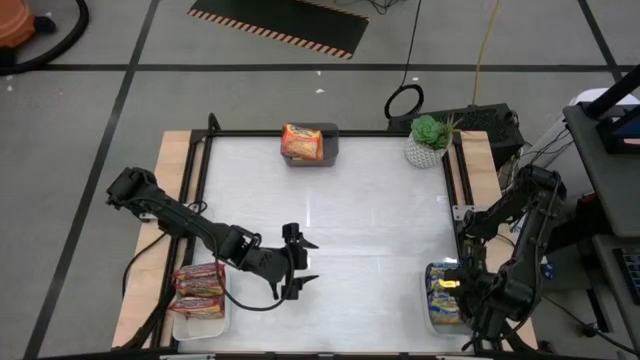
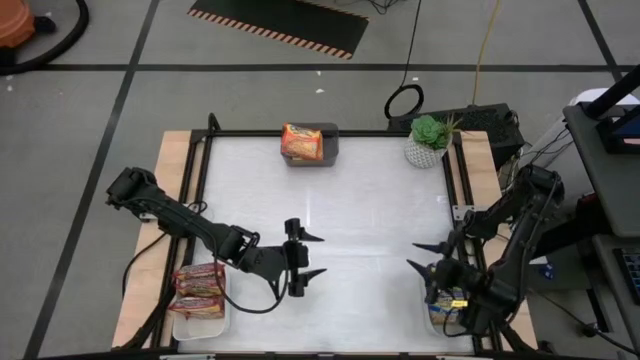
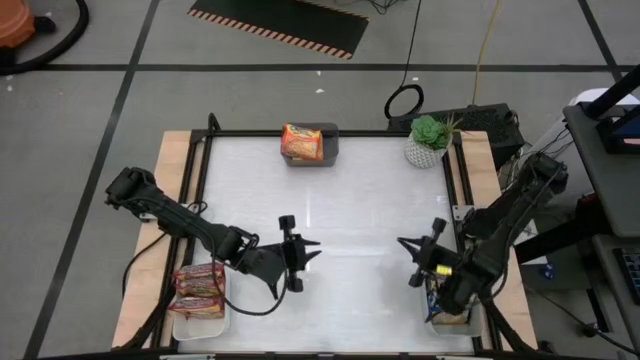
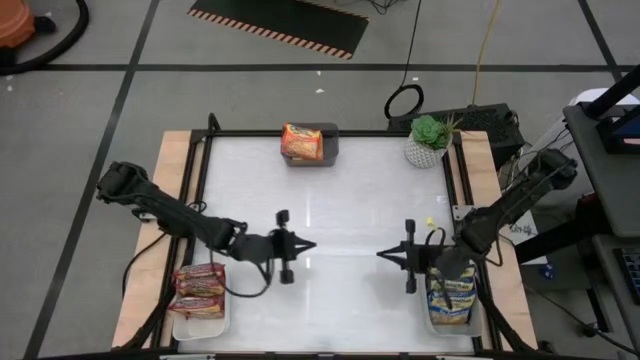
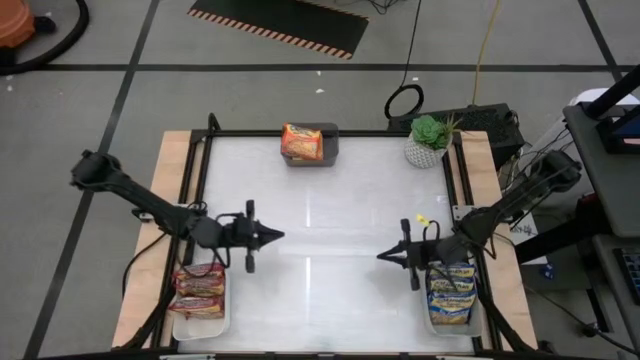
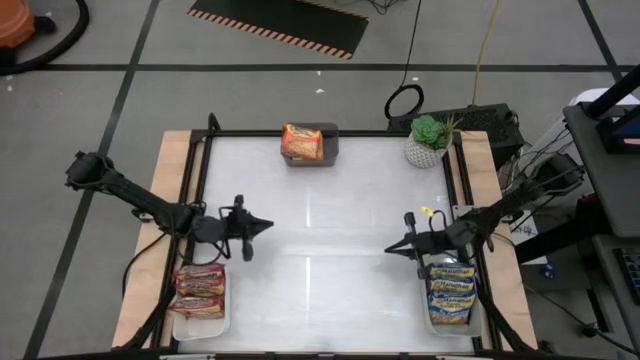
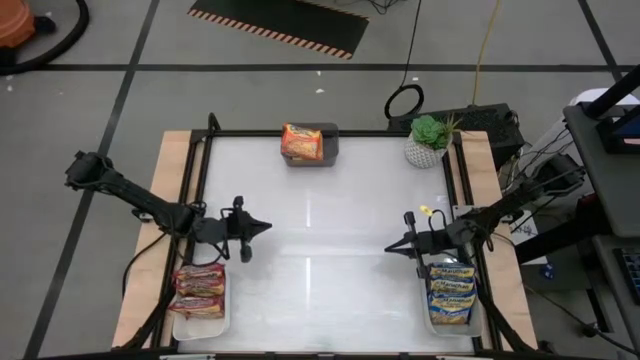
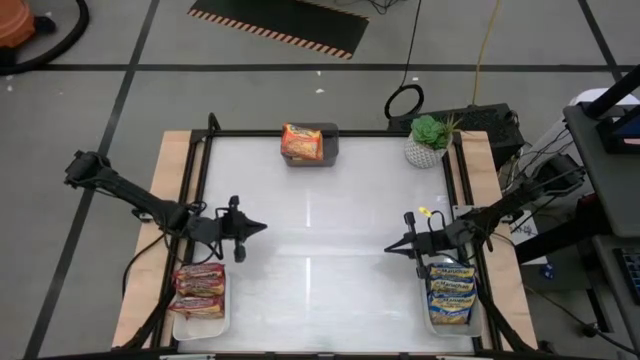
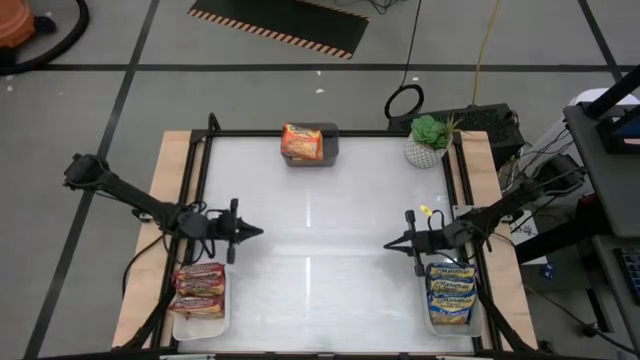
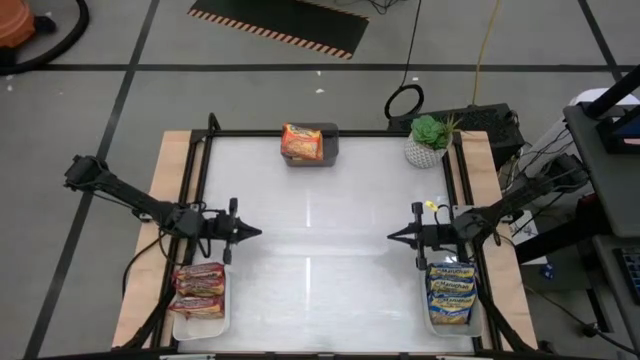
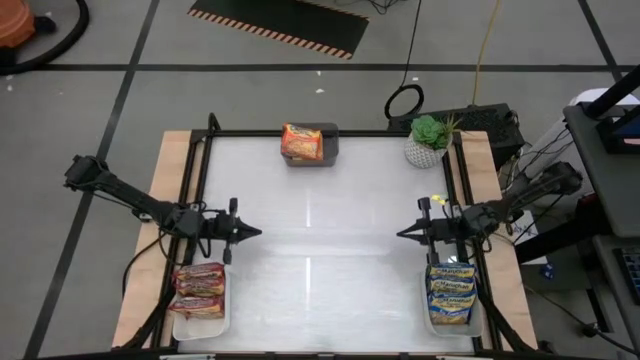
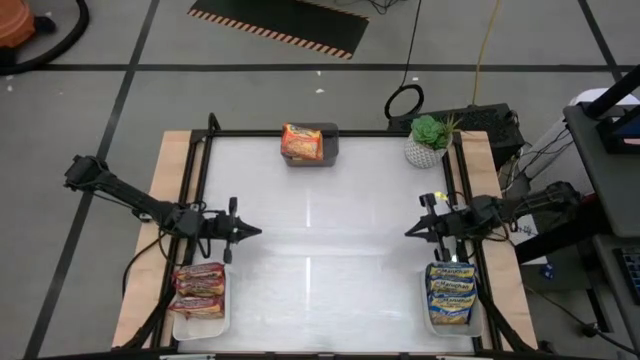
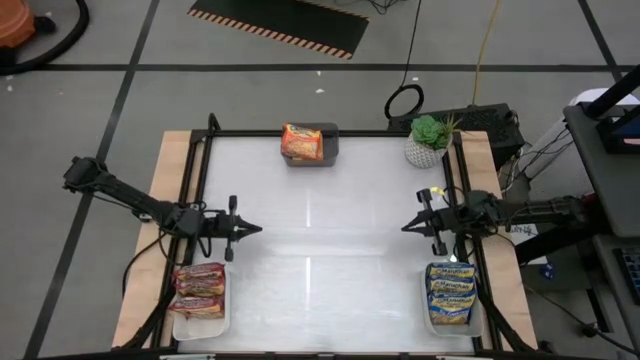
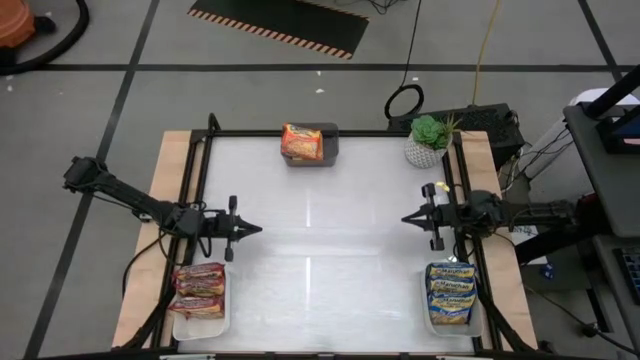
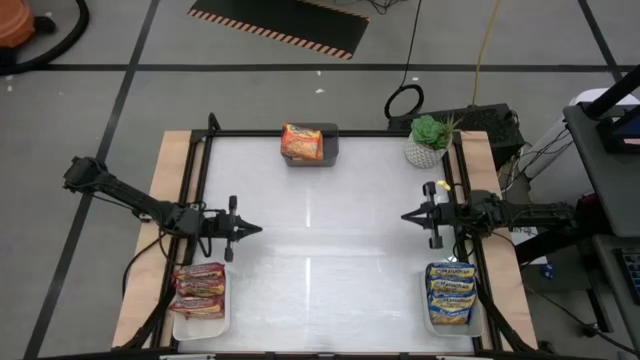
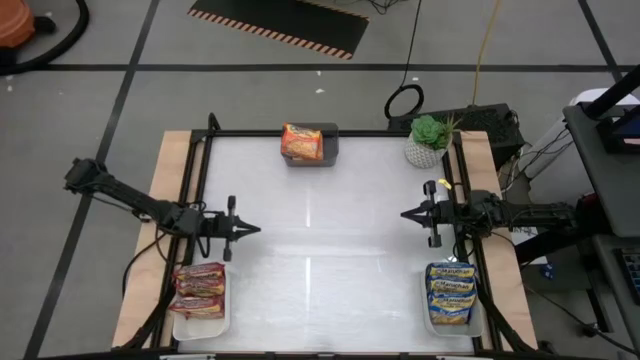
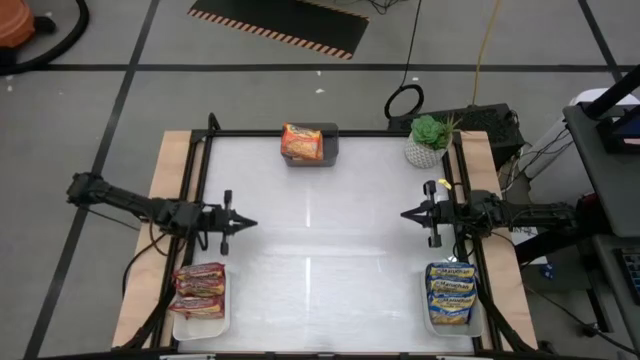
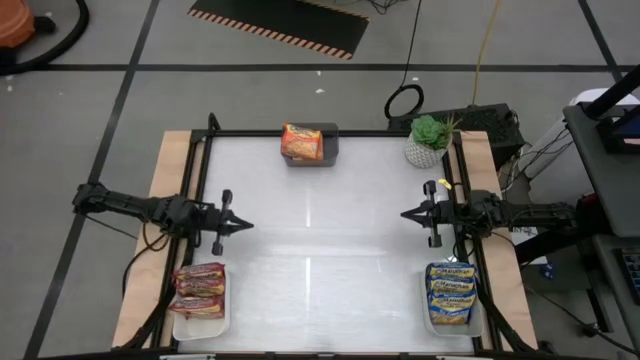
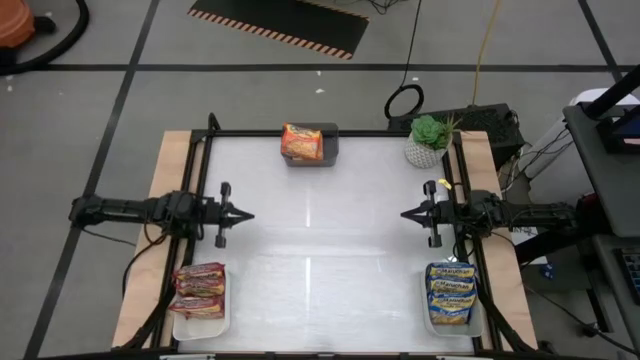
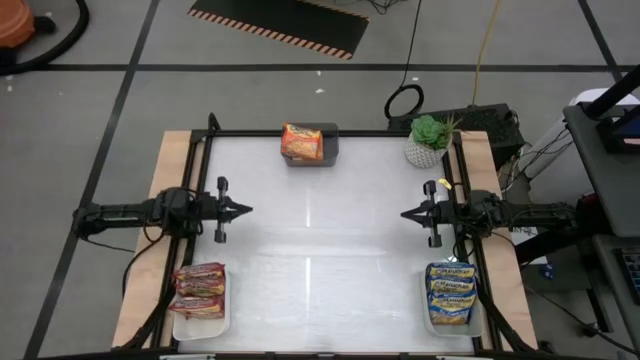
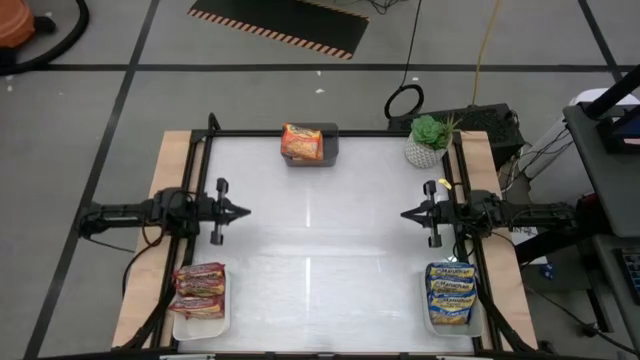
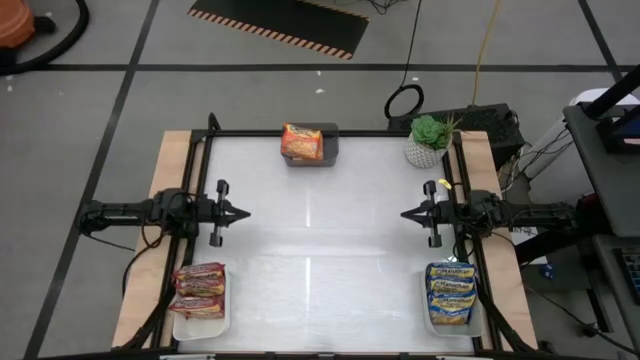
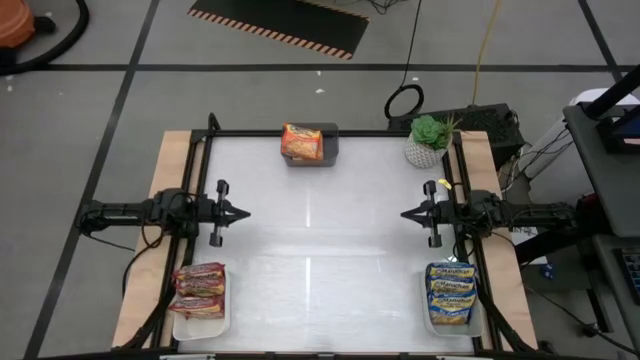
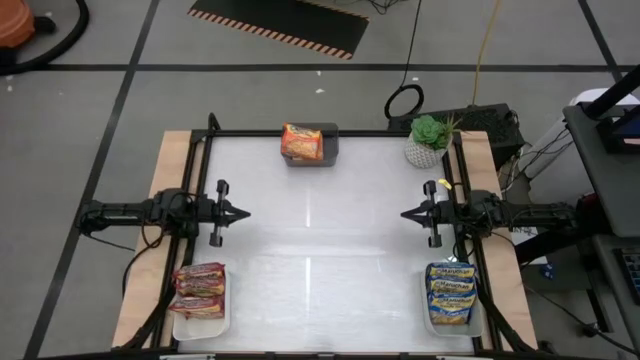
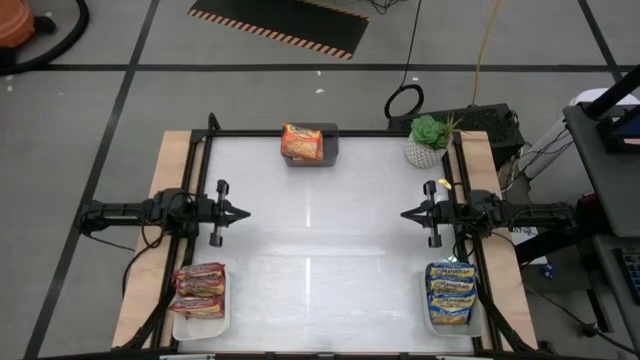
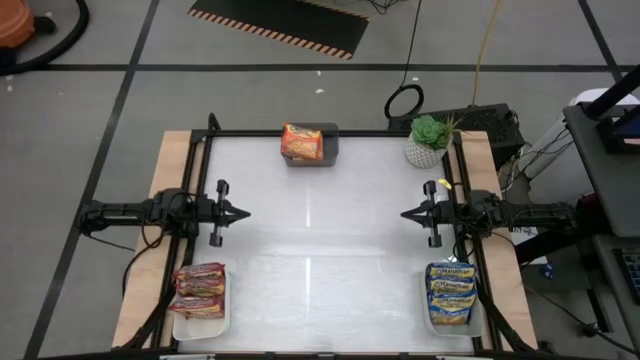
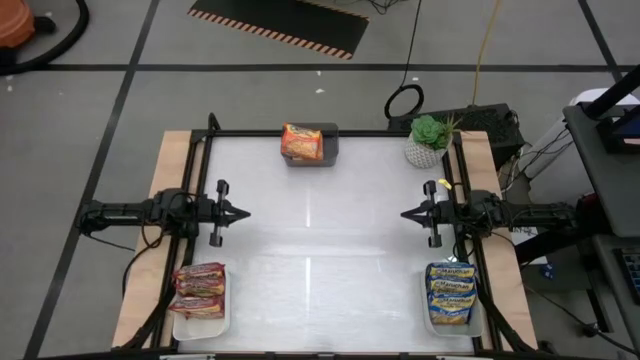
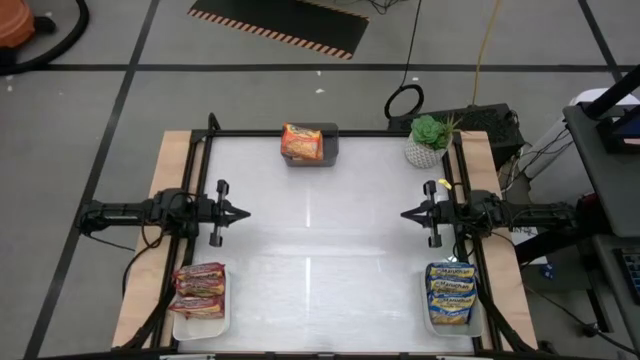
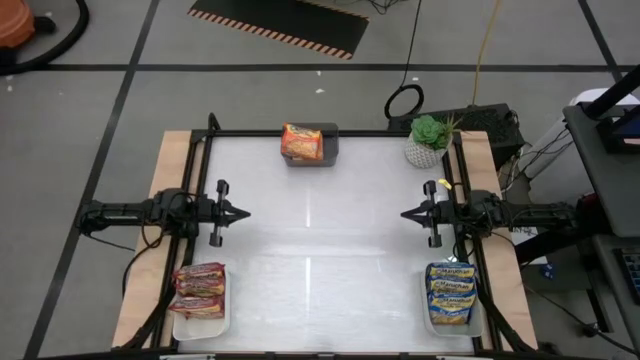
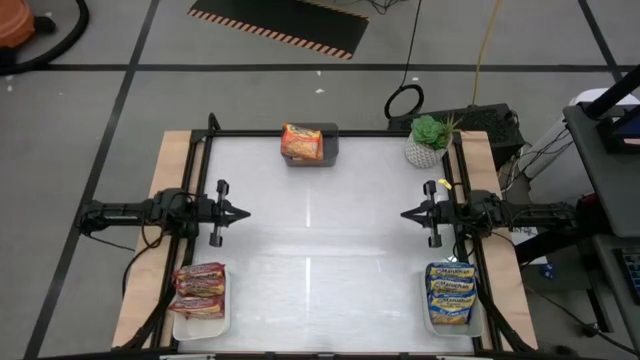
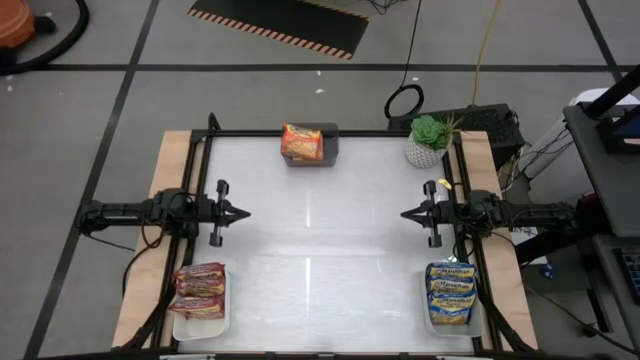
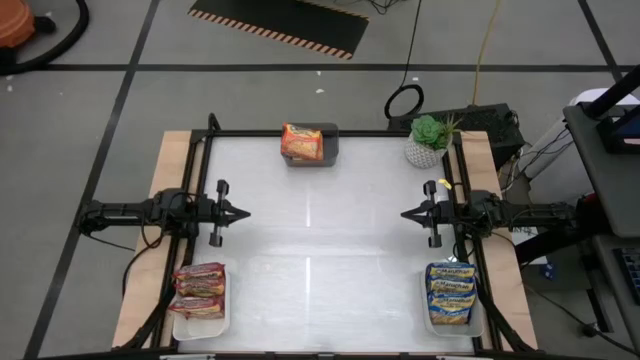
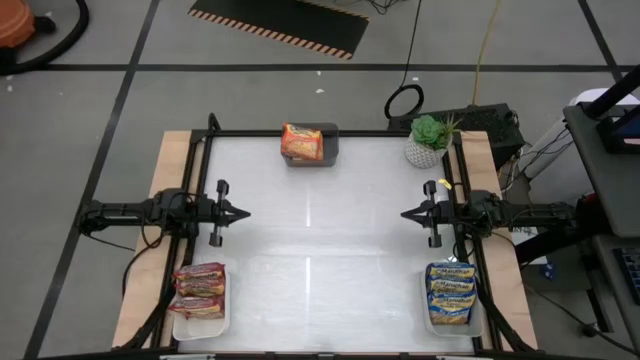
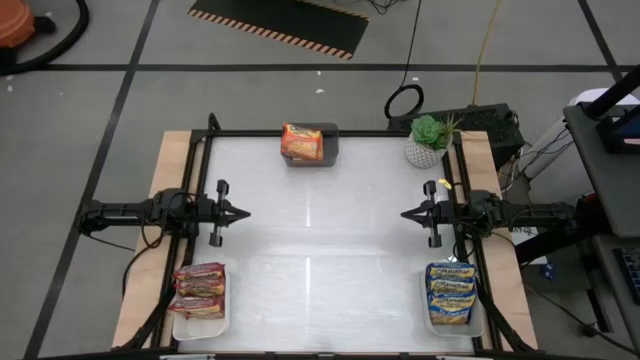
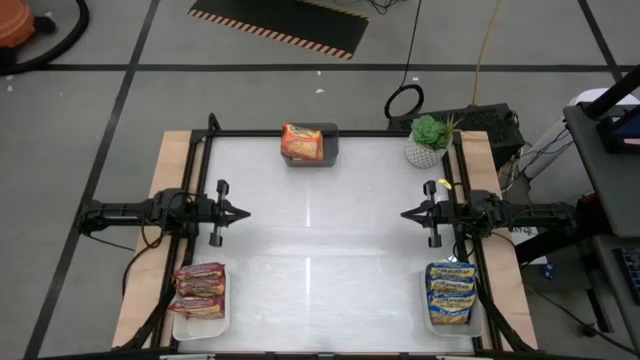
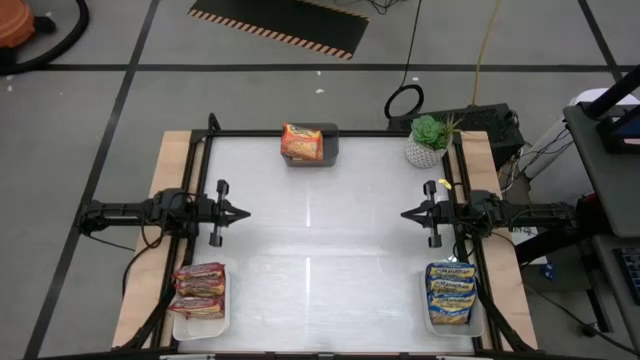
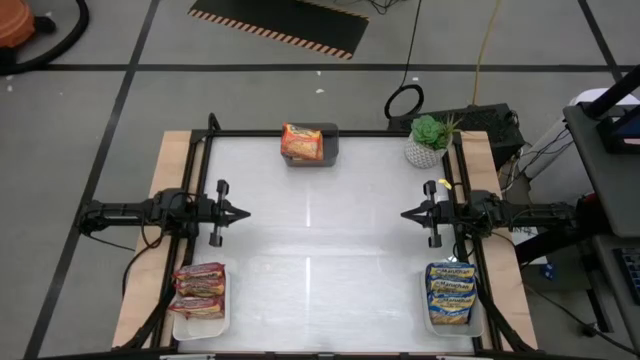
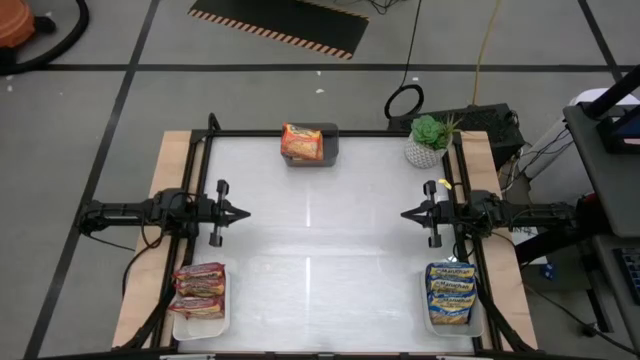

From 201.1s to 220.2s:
Task: Sort Maruchan noodles
Return to Home Position

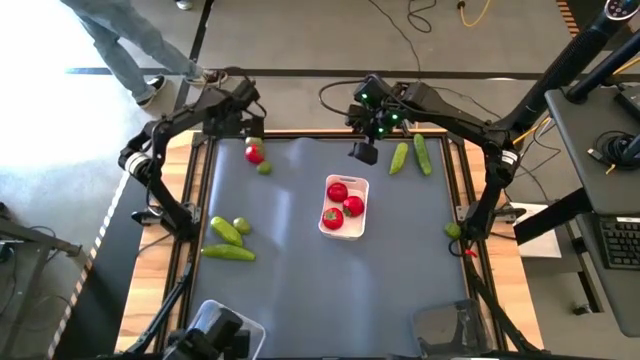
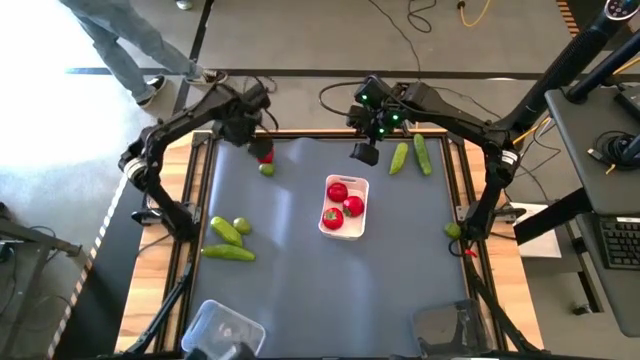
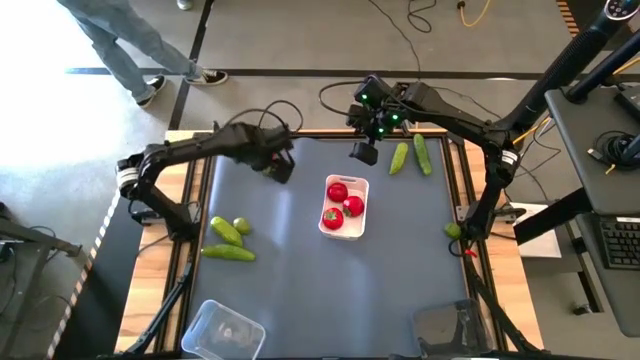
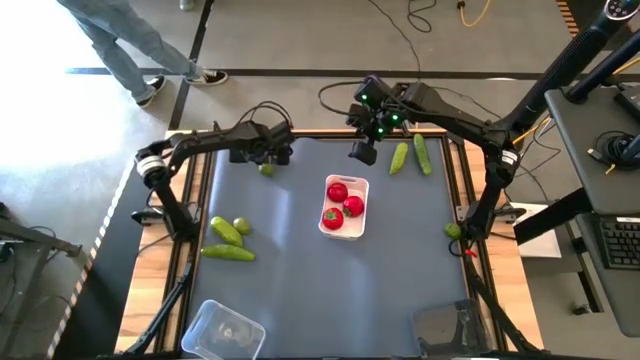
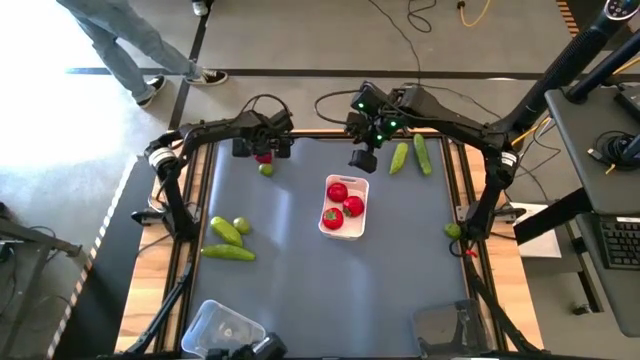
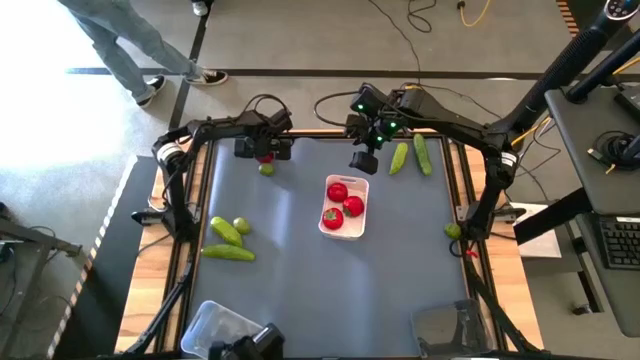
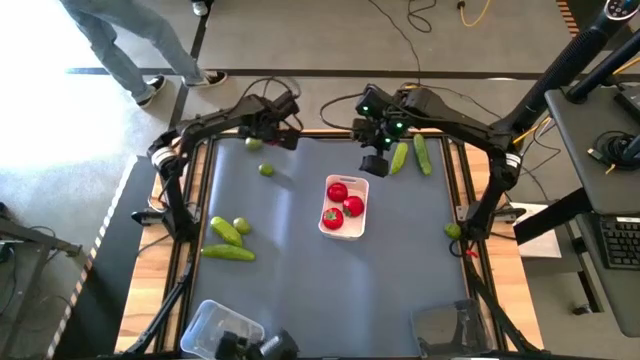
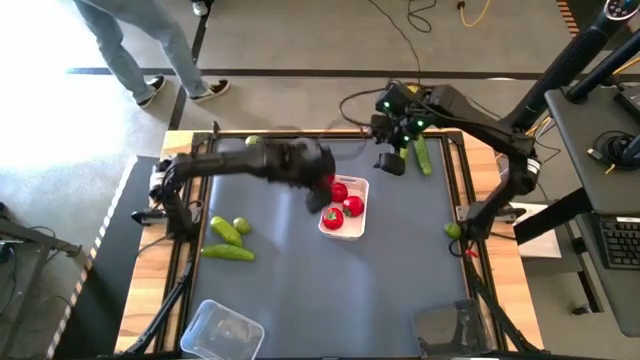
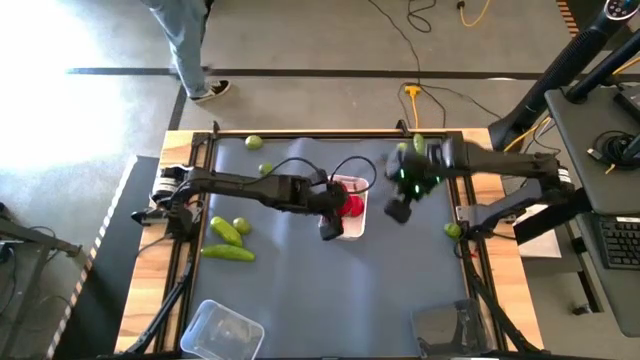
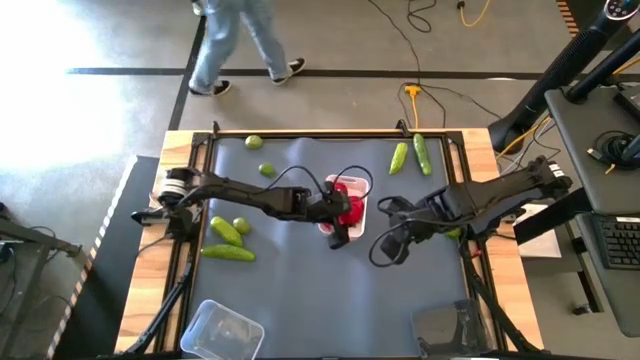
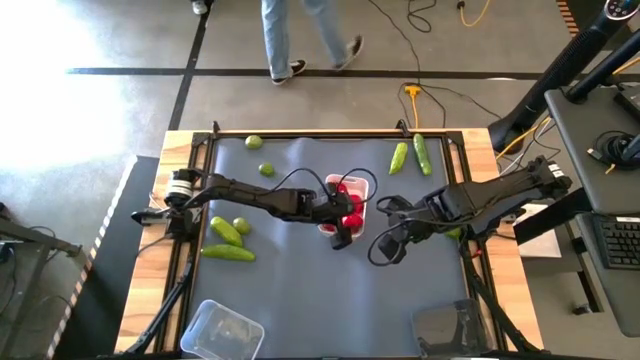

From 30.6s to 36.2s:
Task: Sort produce into baskets
Put the tomato into the white bin
